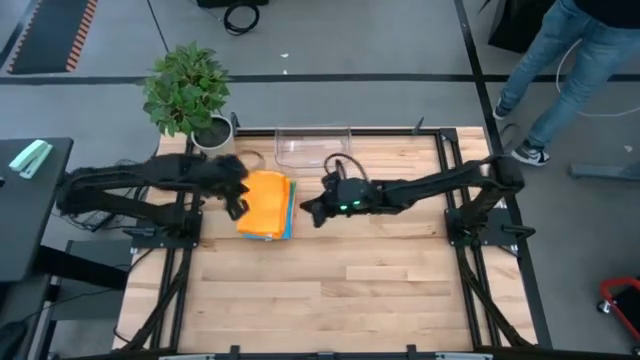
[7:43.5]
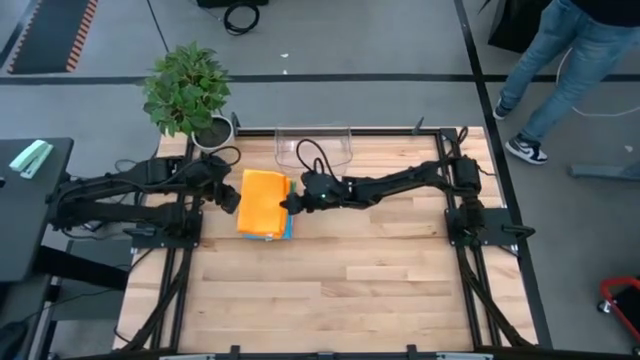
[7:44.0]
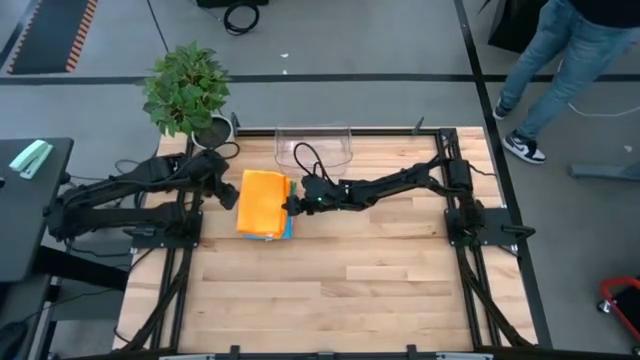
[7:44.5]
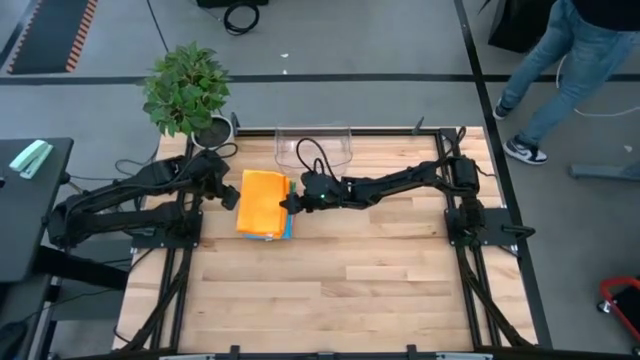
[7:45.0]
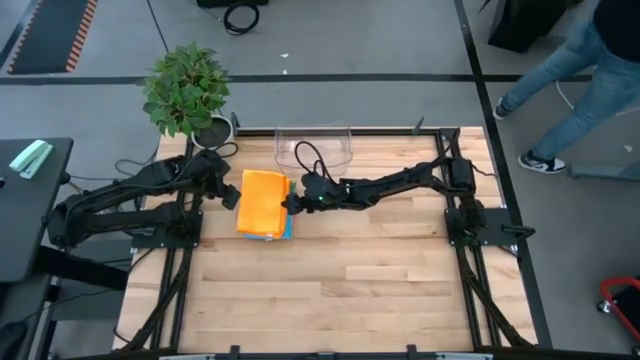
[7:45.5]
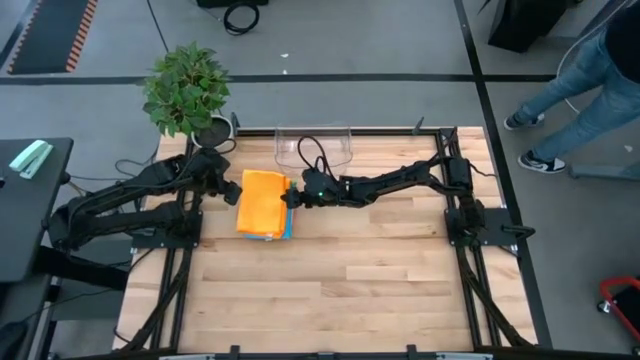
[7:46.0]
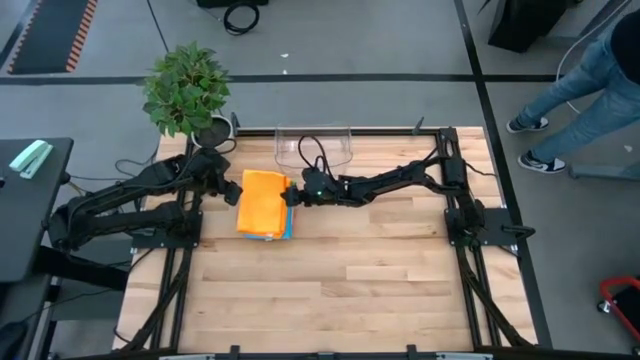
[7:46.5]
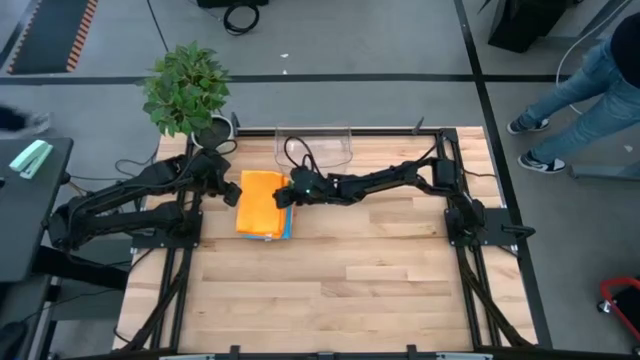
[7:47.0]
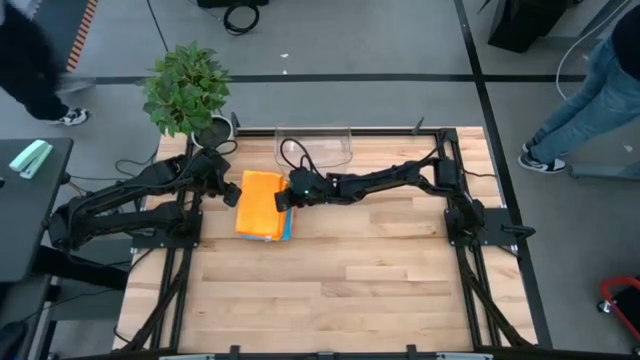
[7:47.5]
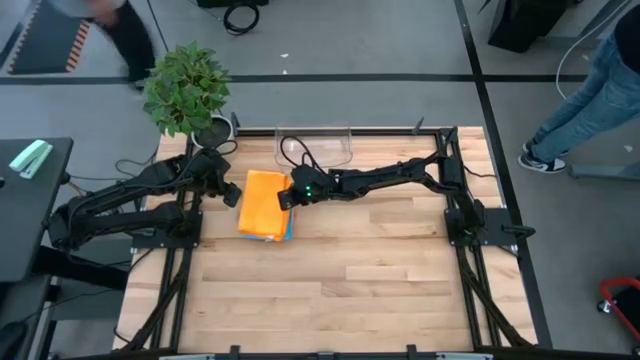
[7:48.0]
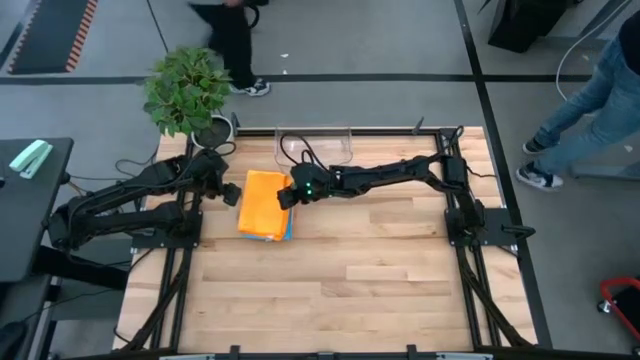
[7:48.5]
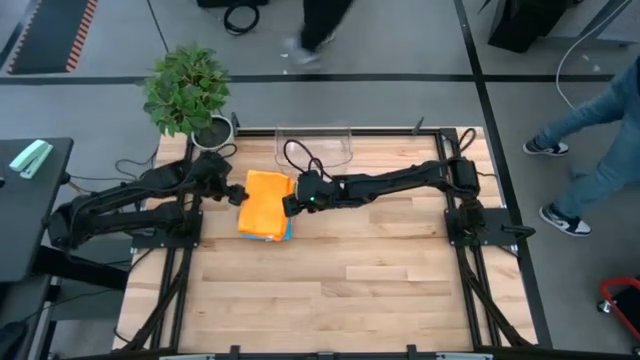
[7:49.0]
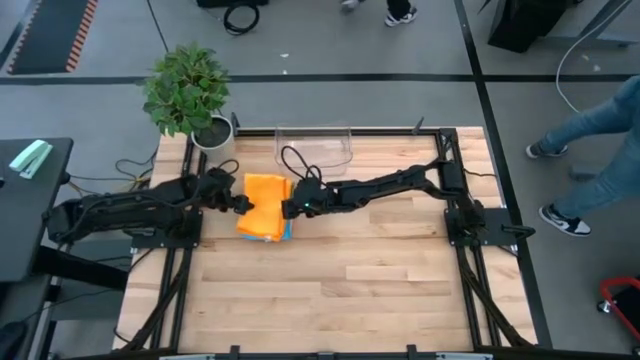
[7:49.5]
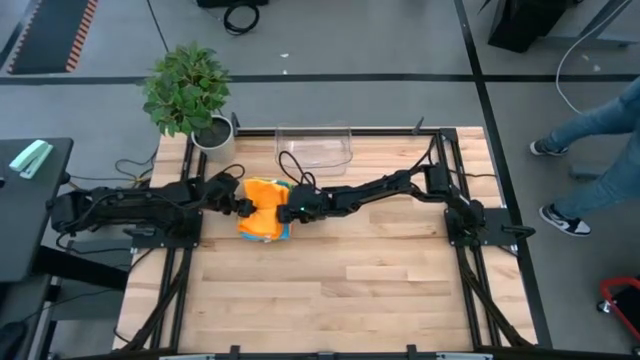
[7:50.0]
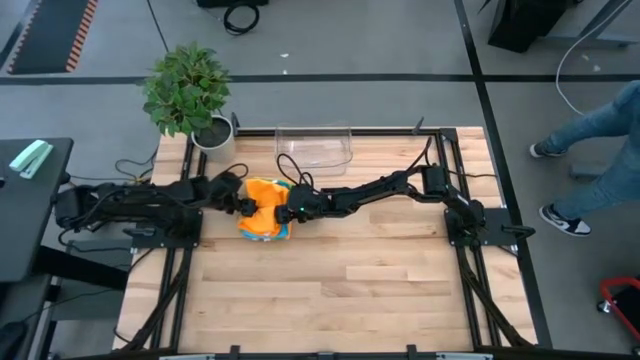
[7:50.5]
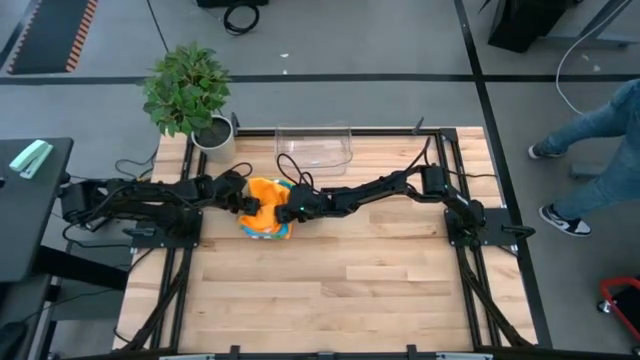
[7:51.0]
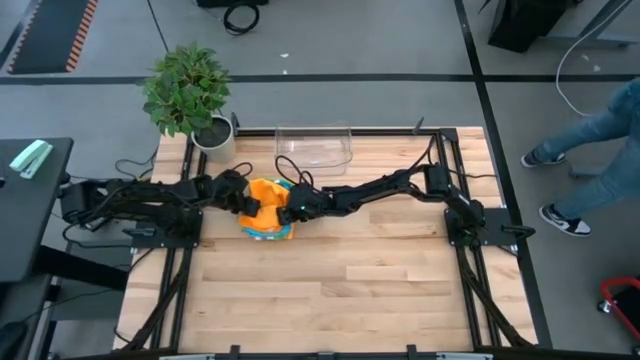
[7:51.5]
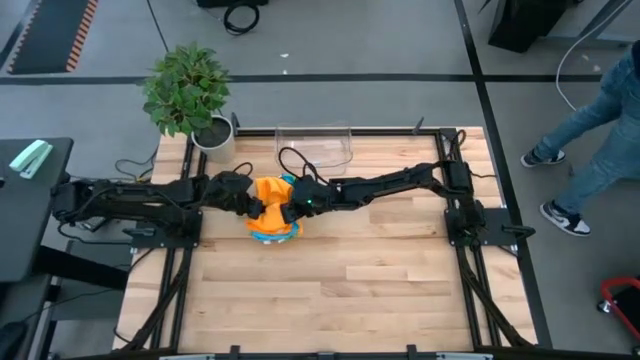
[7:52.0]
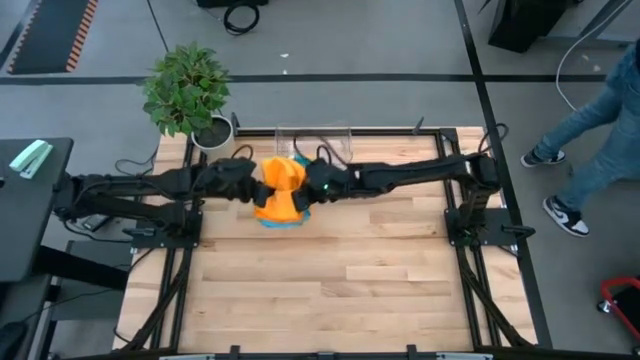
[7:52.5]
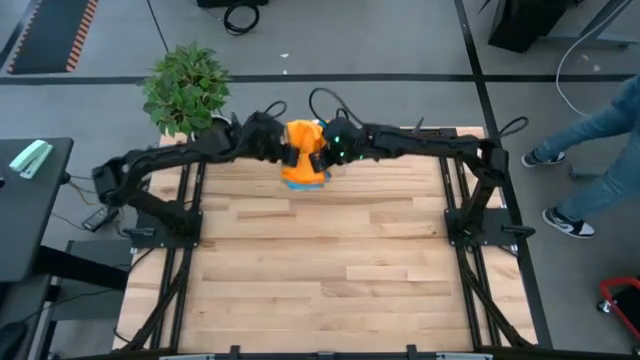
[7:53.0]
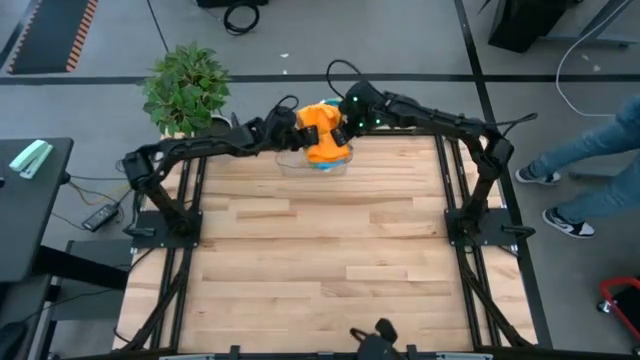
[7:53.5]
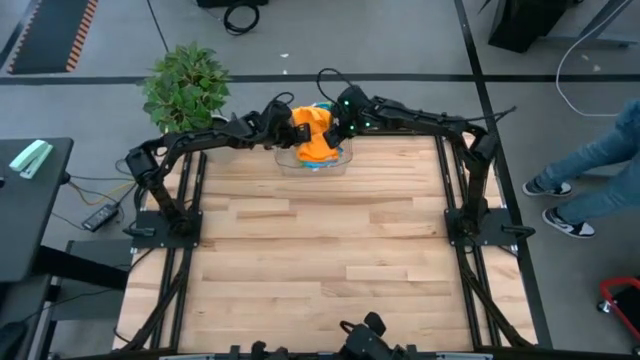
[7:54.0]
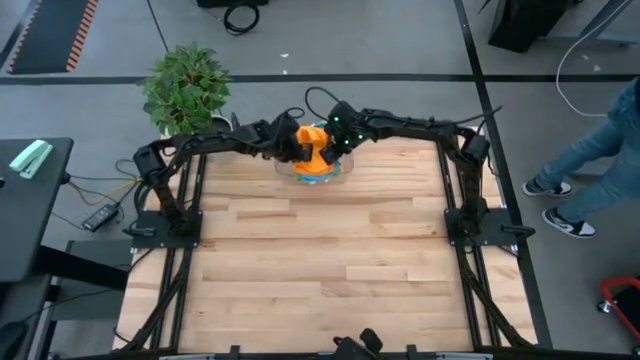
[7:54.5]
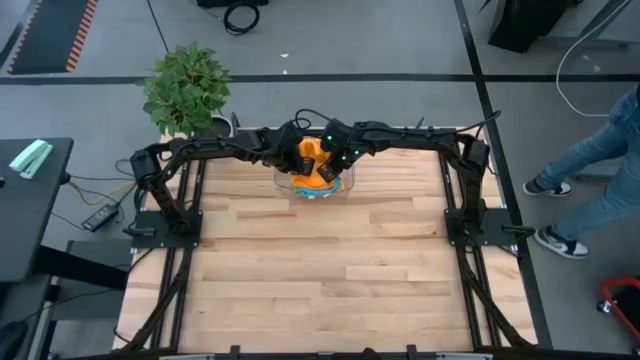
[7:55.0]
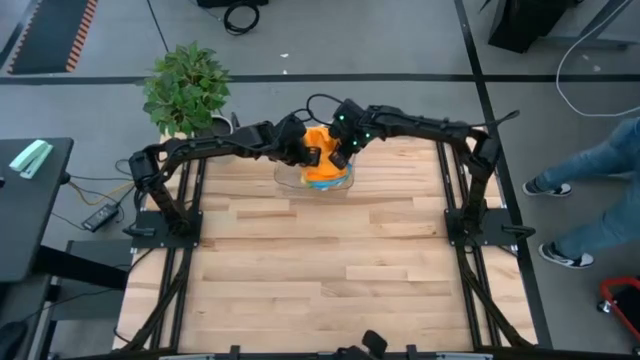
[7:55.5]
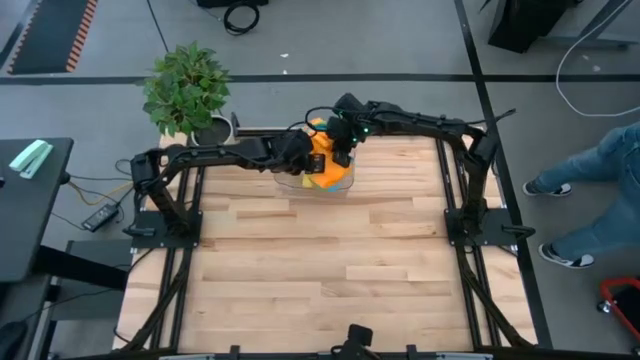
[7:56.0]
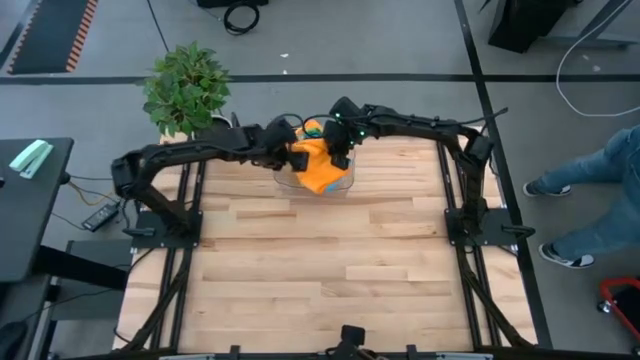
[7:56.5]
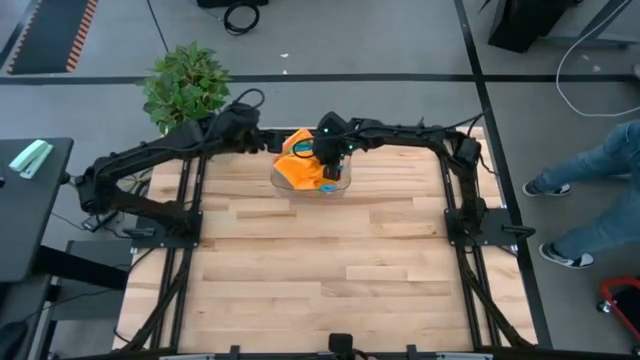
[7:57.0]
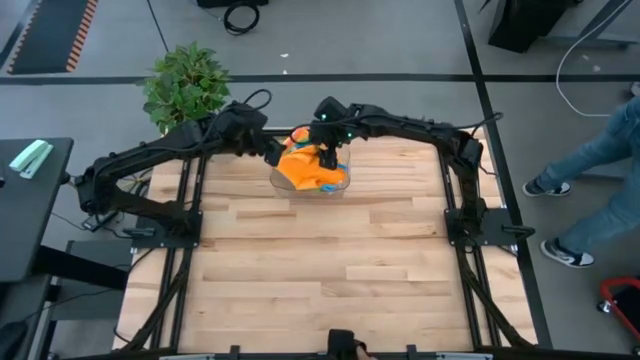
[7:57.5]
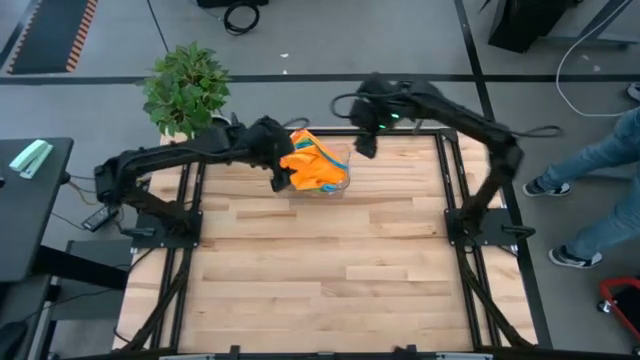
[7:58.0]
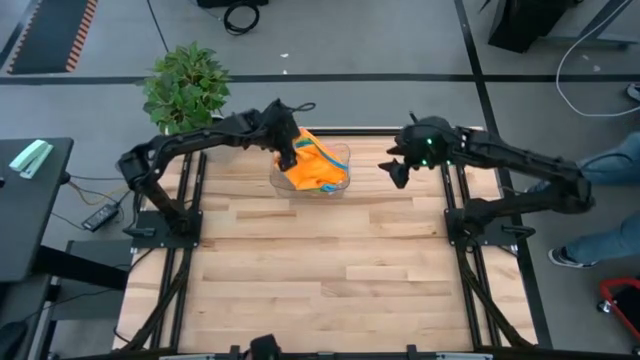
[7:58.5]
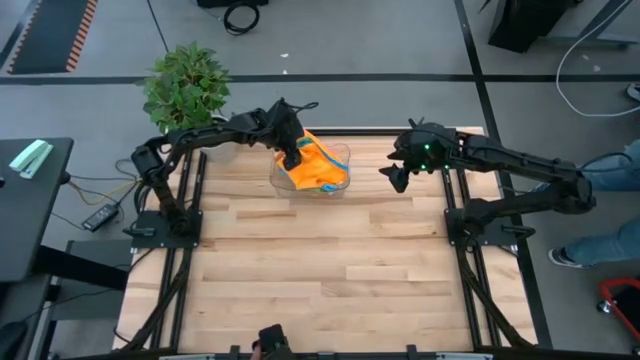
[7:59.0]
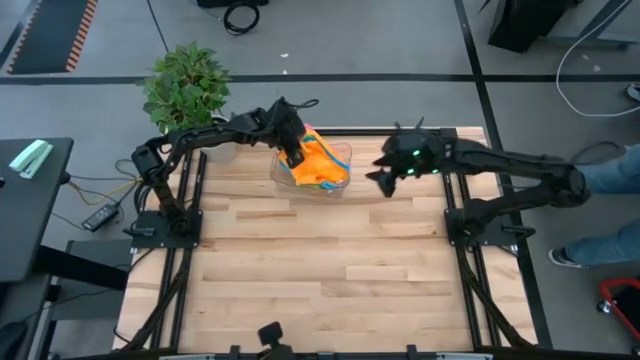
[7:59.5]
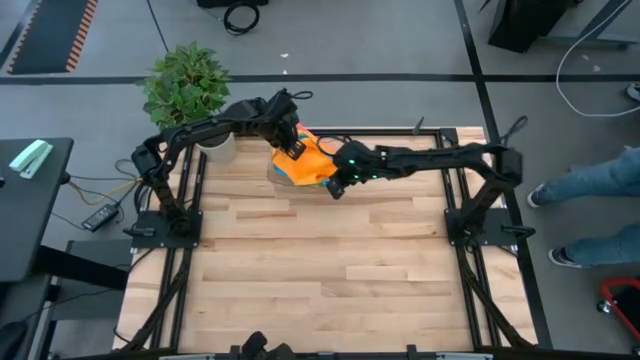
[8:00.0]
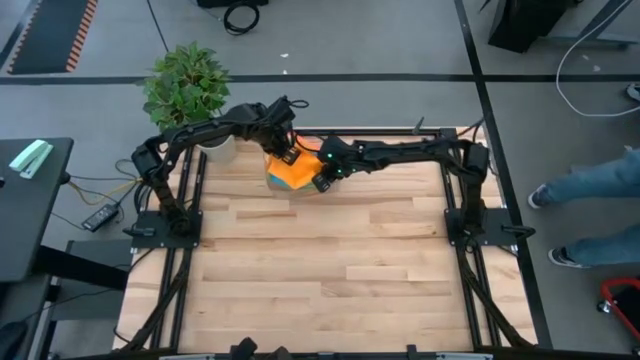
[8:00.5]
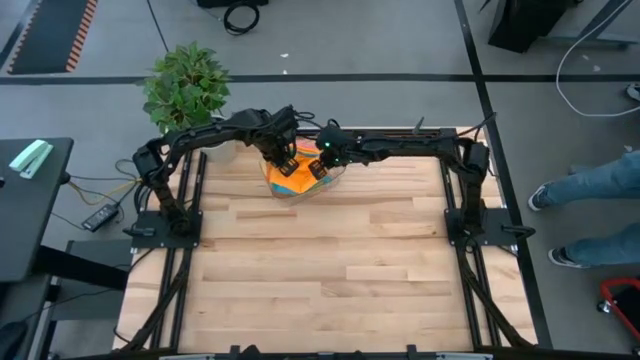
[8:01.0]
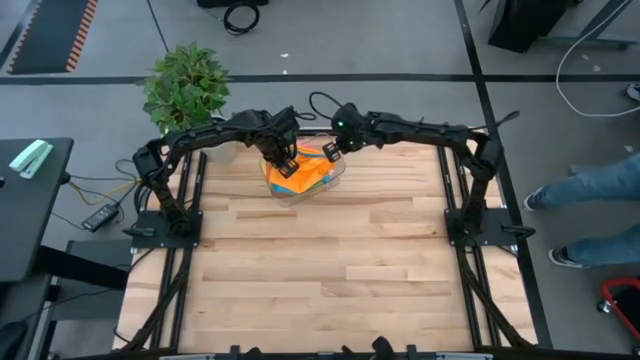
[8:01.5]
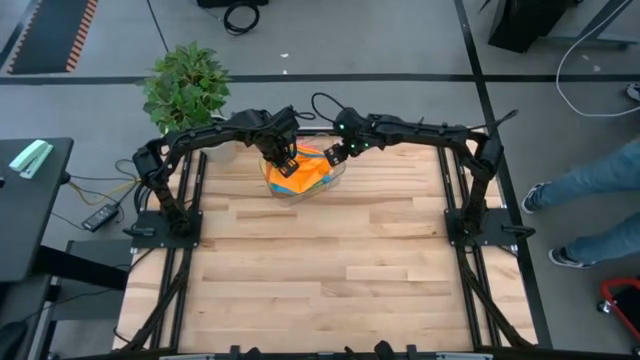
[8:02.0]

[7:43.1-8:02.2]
Task: Fold microfiber towels
Put the stacked microfiber cloths into the transparent bin

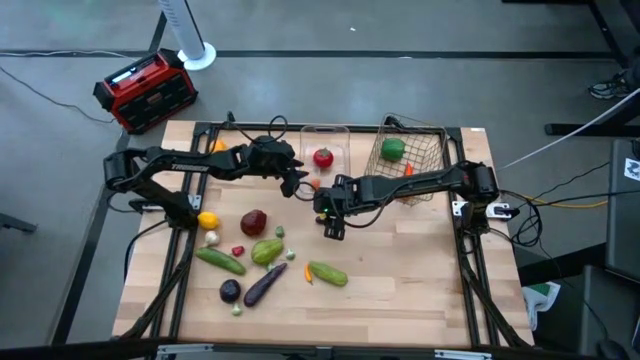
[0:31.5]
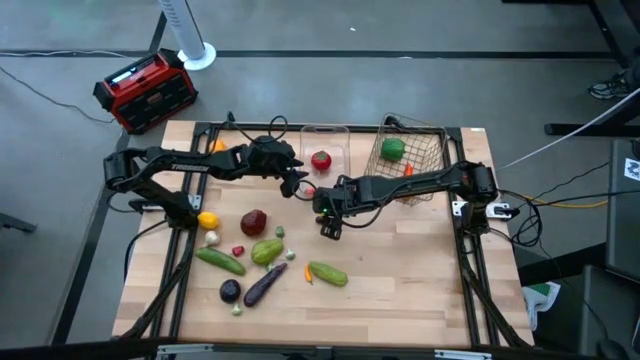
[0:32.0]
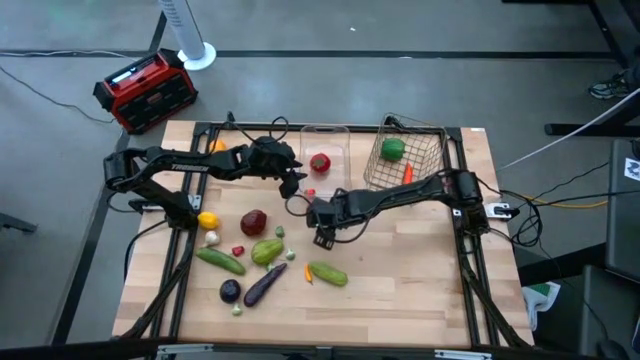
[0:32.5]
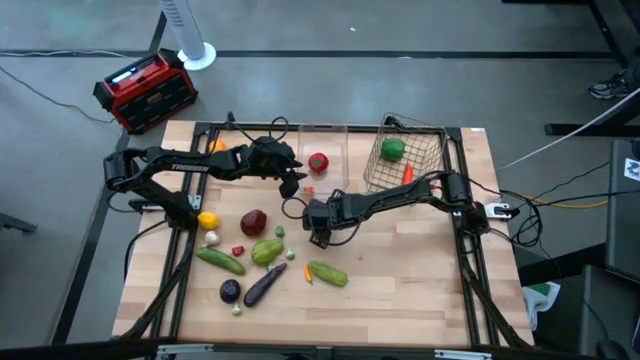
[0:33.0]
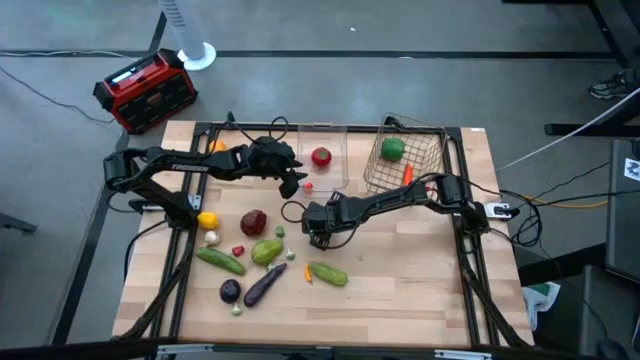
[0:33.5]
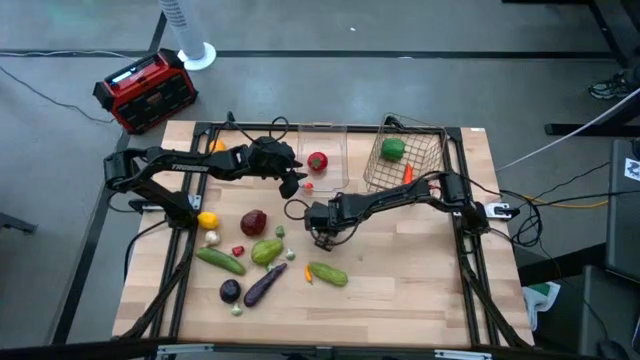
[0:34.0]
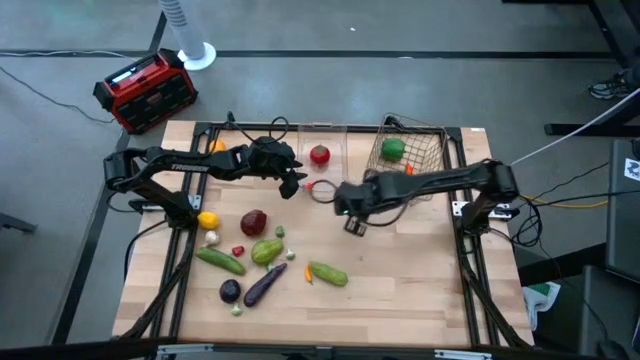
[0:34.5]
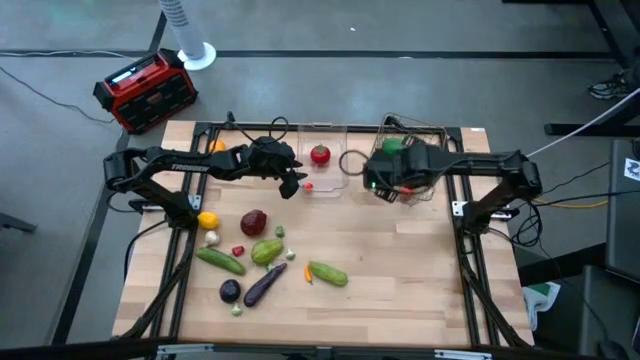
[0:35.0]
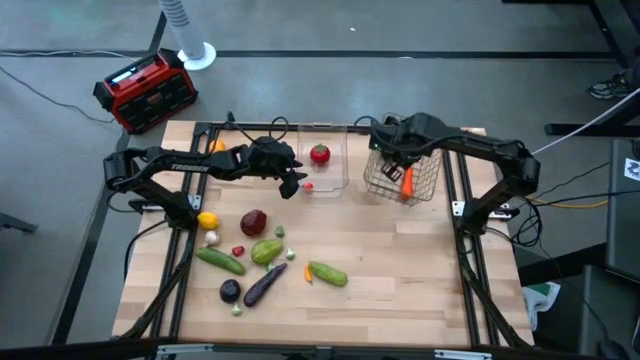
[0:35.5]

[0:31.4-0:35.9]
Task: Sort produce into baskets
Put the violet eggplant into the wire basket
